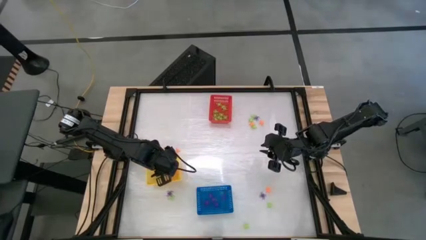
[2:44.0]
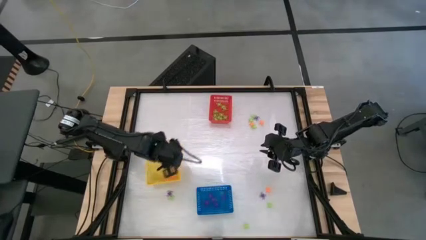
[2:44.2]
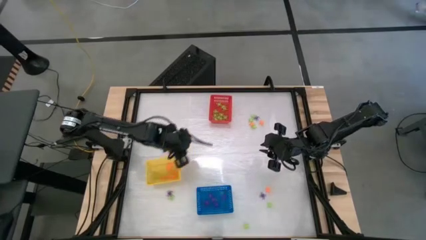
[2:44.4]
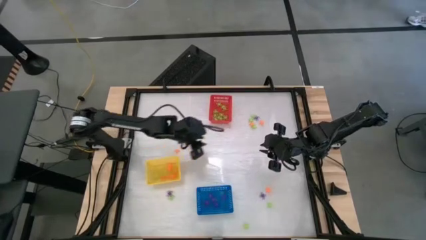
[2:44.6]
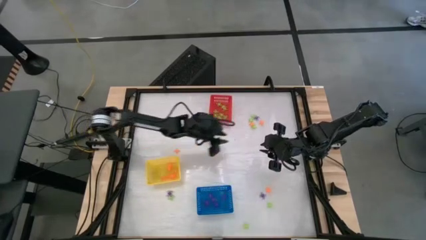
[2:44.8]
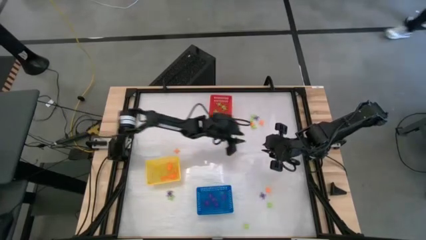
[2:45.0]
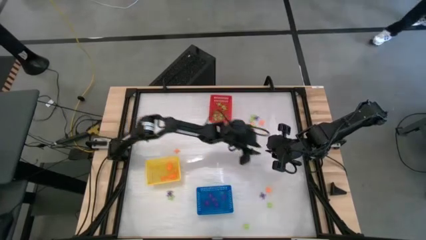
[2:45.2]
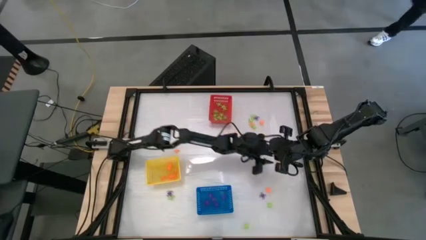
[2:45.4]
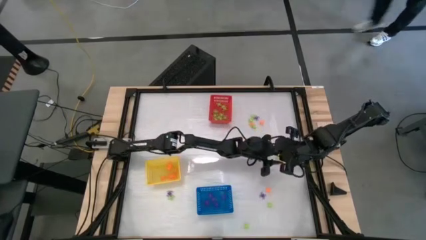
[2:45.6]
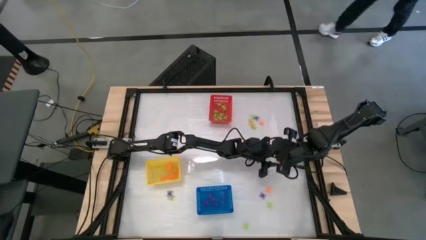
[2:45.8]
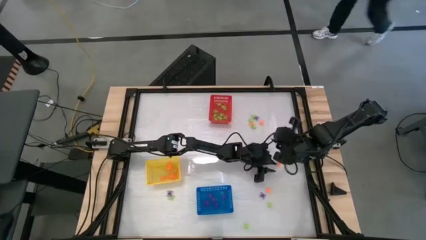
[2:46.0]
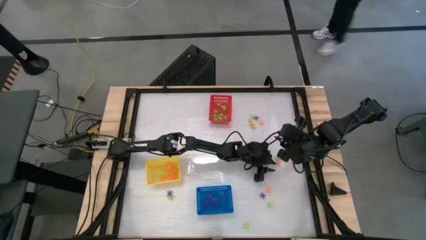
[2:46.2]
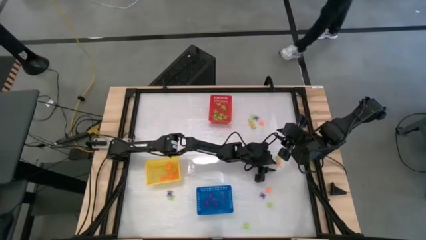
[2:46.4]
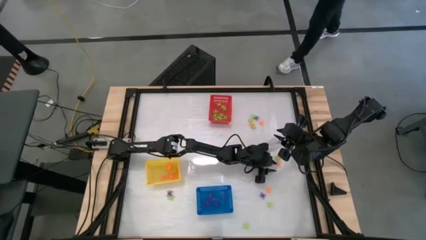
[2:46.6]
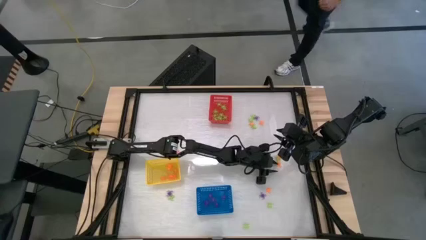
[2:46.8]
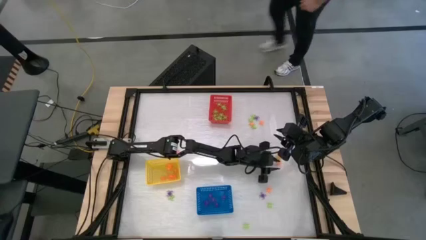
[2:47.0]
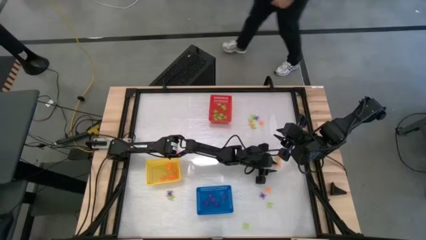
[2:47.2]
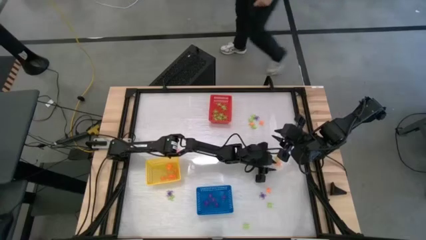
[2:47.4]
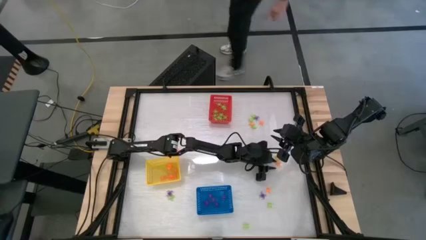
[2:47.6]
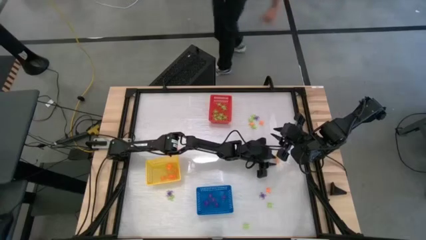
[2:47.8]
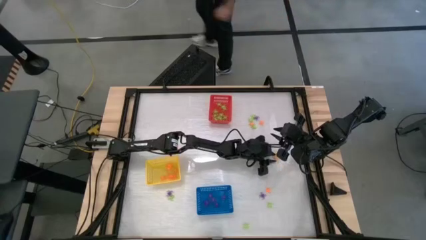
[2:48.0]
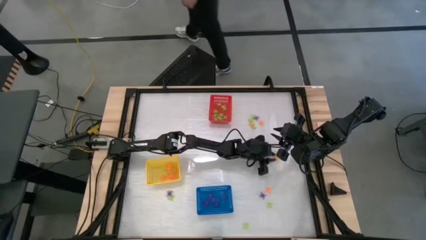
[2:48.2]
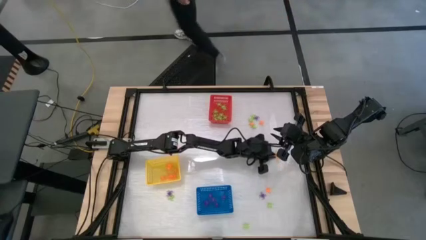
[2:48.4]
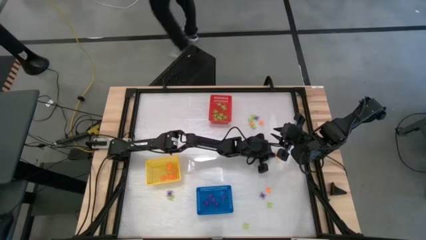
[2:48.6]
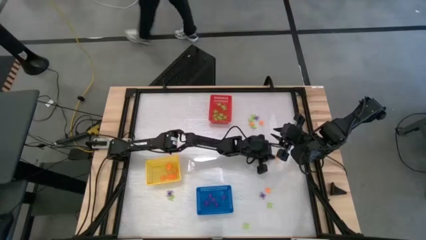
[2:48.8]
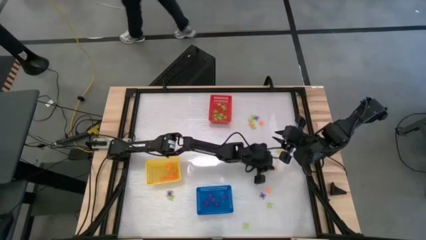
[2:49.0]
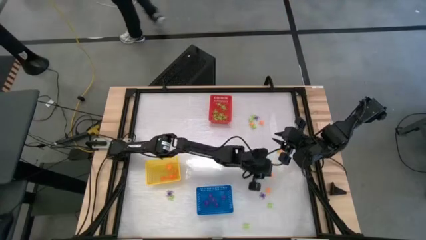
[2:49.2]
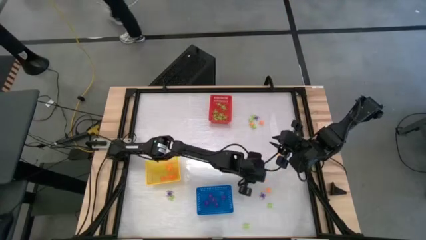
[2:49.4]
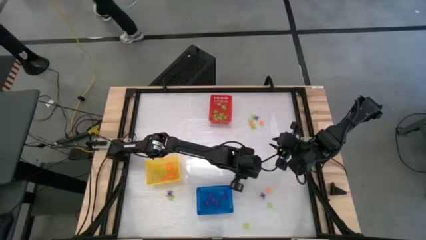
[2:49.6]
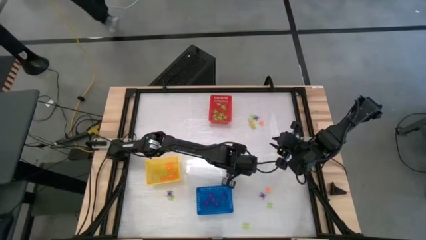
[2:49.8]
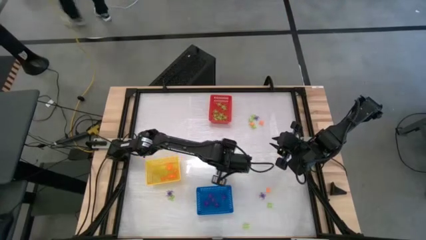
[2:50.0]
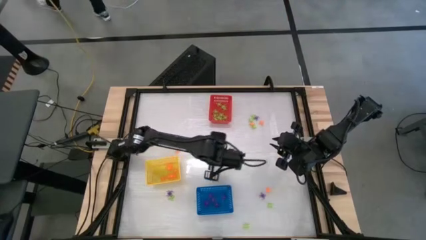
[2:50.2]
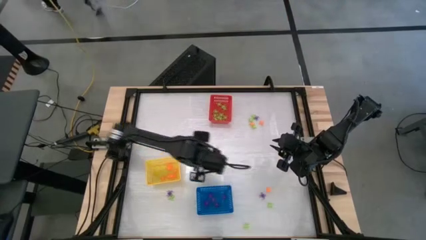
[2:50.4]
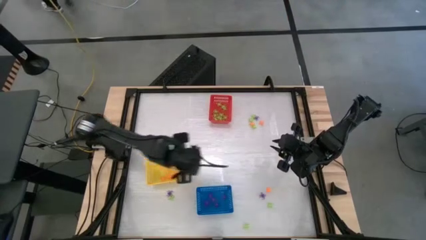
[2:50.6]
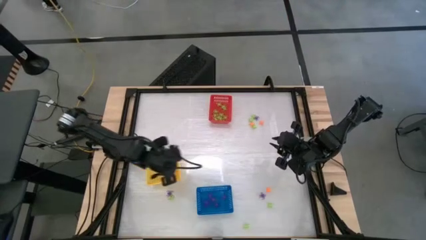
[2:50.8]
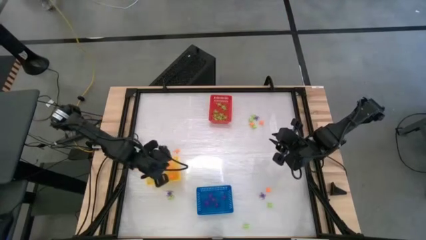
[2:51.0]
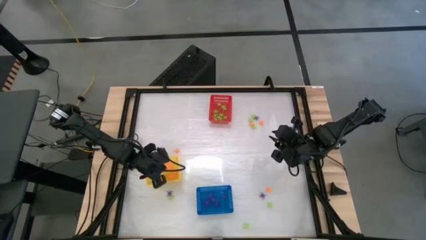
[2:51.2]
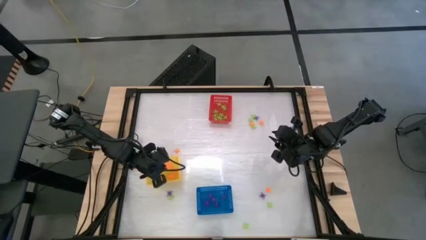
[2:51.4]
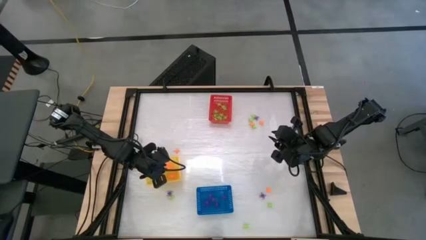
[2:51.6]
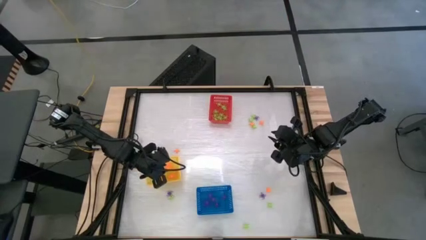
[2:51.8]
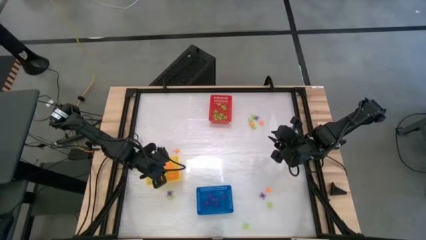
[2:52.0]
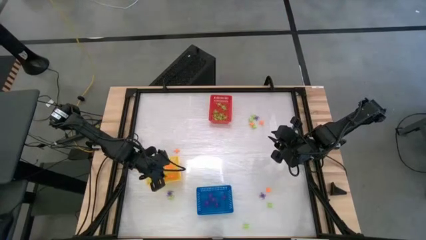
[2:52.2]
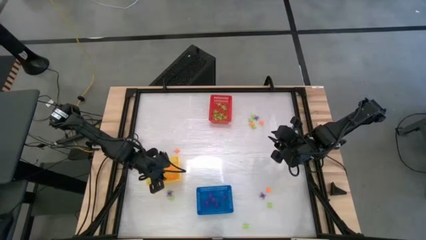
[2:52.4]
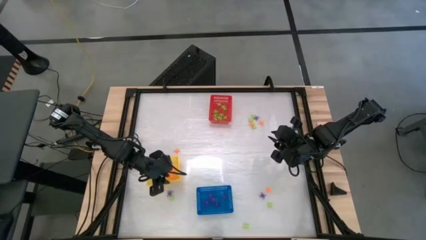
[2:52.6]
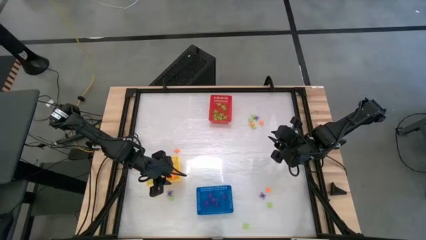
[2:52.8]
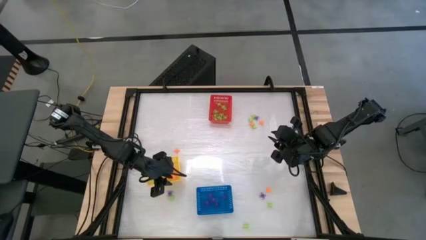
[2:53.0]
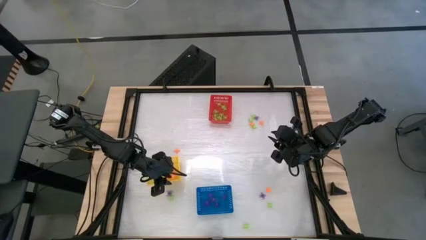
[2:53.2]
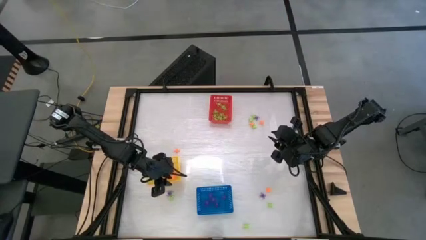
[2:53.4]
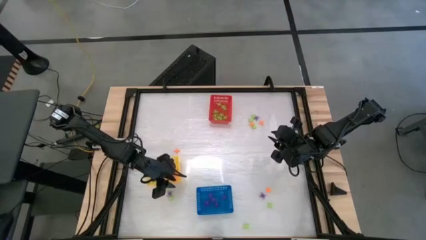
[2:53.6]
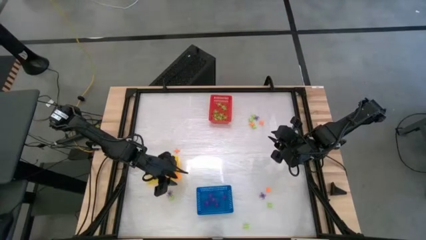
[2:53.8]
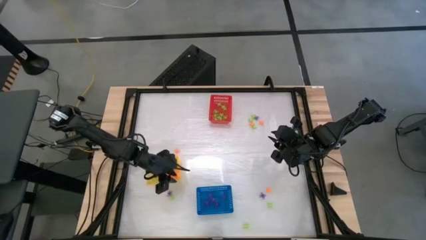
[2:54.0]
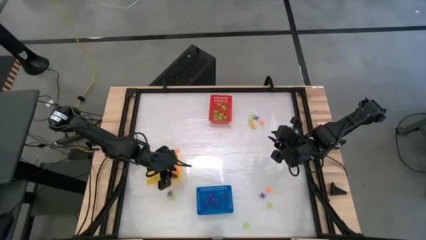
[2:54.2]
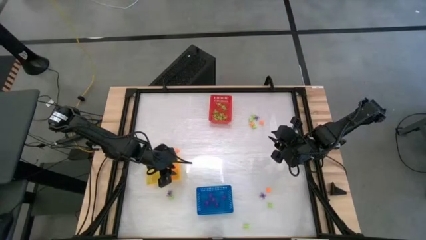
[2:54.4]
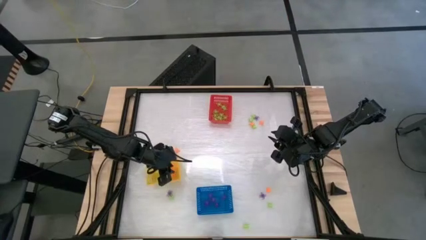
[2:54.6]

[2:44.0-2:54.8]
Task: Sort Halloween decoration
Put the orange spider toy into the yellow basket

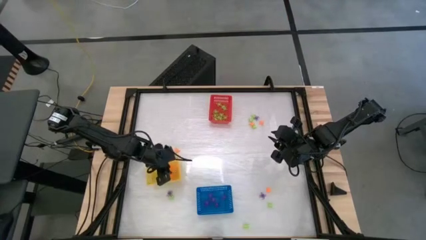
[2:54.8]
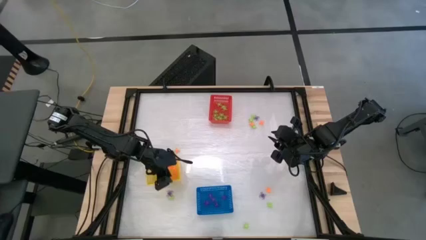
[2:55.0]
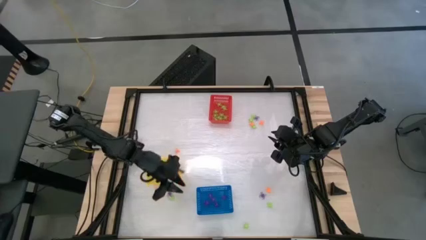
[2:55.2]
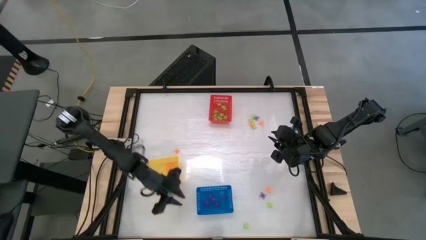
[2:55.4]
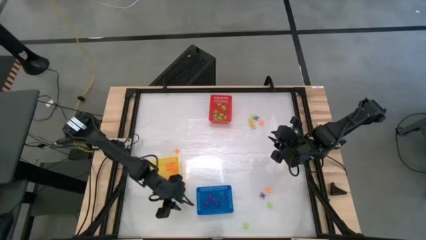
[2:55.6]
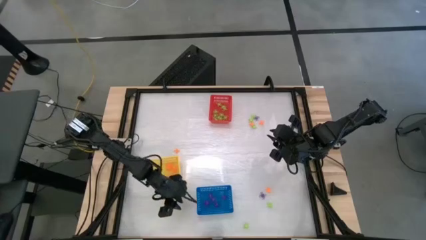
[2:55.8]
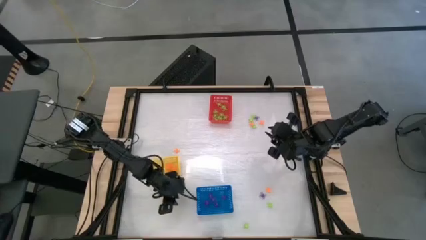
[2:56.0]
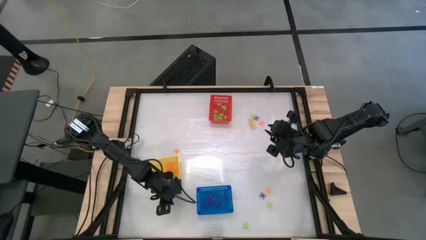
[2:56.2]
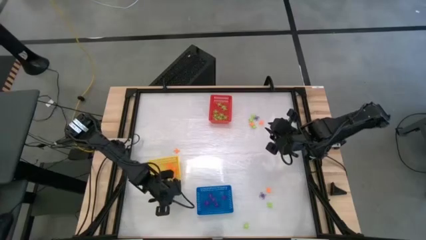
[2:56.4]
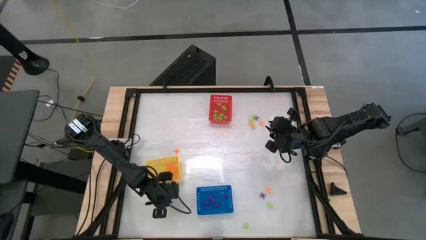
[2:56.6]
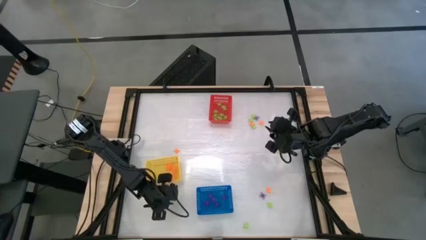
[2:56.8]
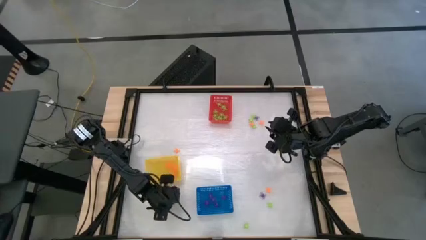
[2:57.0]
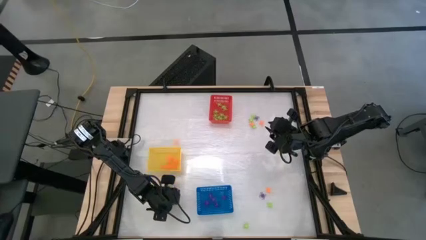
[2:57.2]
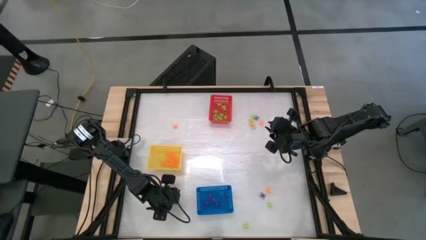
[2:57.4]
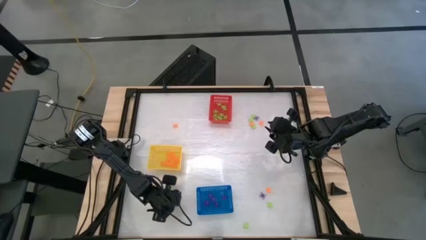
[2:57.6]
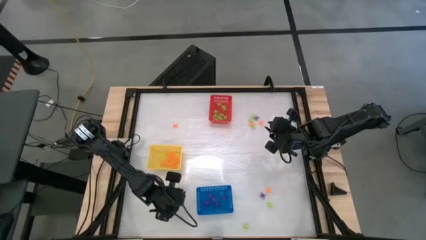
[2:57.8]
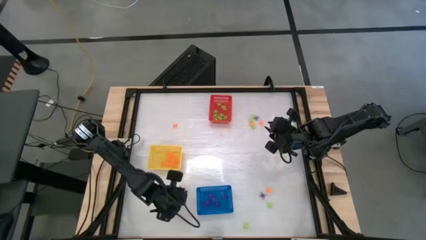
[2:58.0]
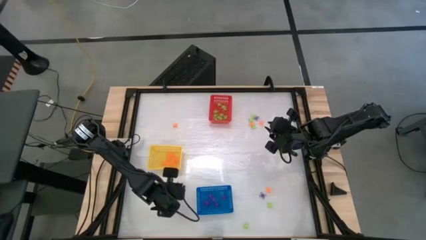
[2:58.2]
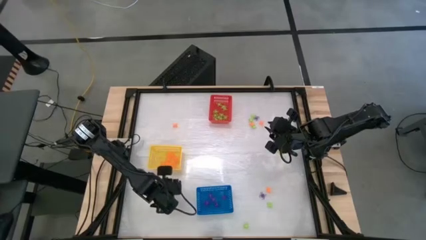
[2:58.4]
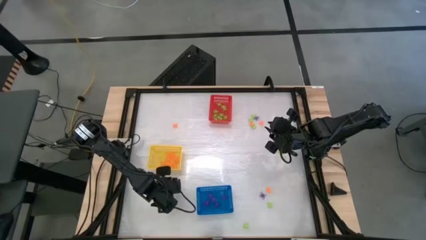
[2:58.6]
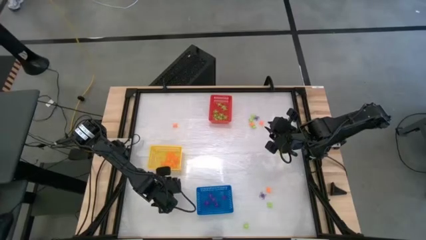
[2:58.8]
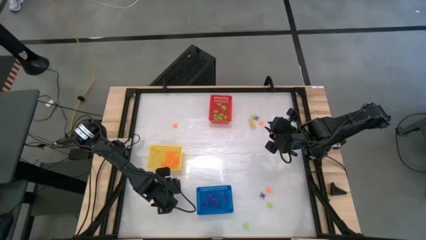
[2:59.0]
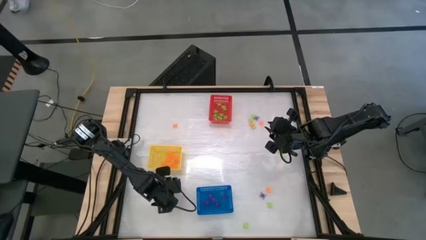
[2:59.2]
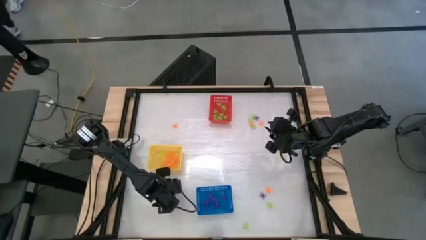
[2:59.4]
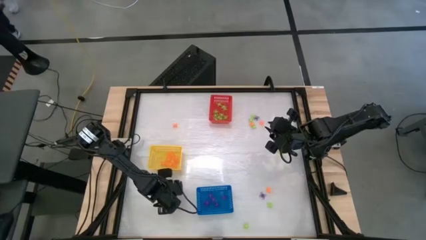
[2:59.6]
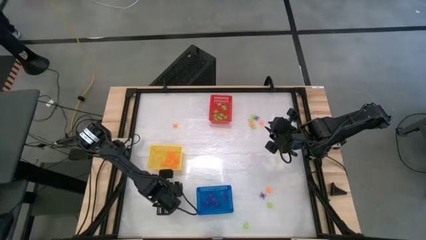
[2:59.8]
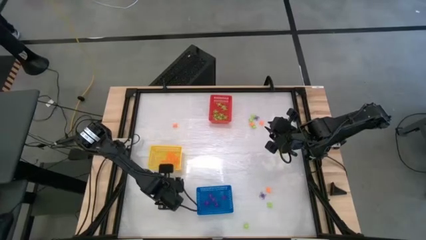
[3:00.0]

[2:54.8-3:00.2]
Put the purple spider toy into the blue basket
